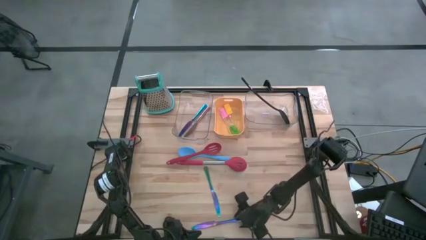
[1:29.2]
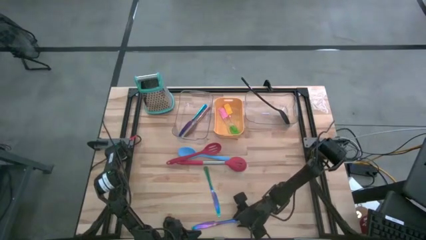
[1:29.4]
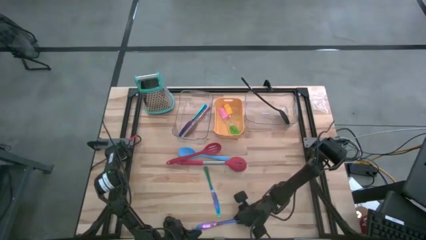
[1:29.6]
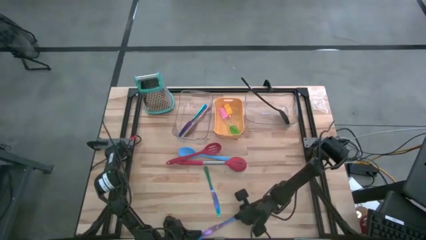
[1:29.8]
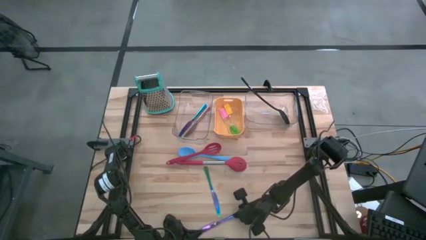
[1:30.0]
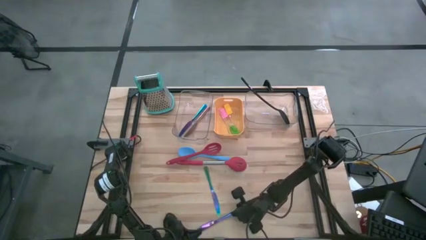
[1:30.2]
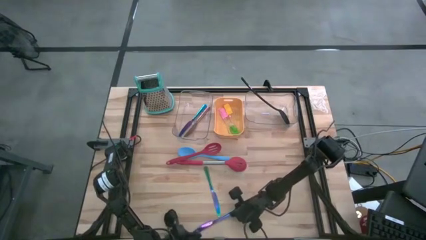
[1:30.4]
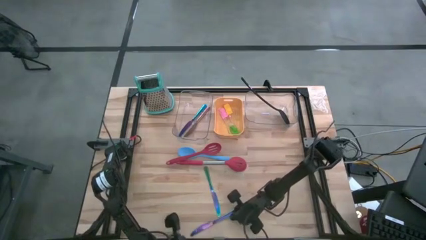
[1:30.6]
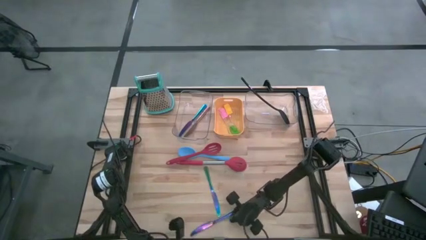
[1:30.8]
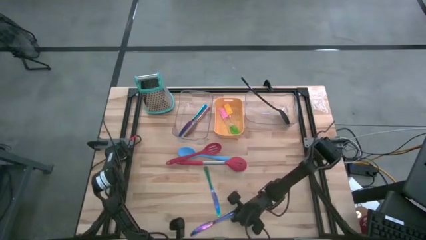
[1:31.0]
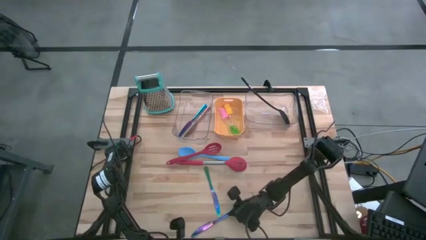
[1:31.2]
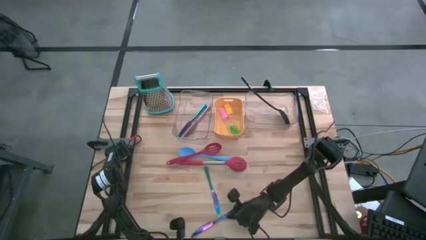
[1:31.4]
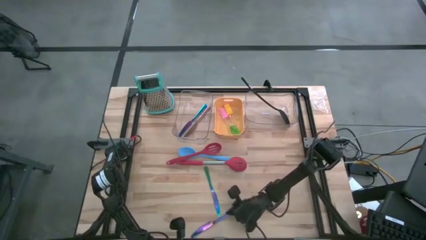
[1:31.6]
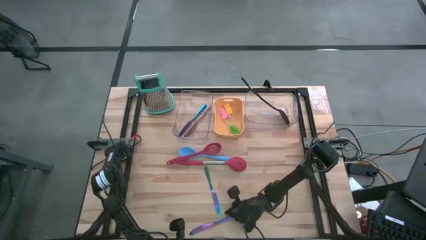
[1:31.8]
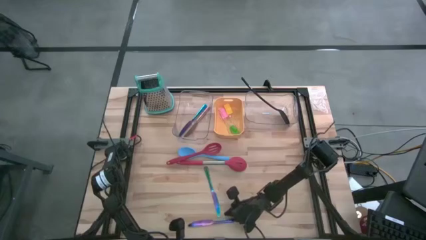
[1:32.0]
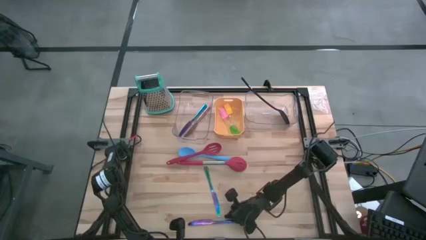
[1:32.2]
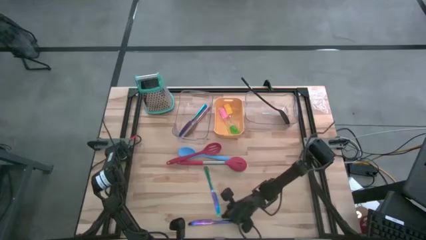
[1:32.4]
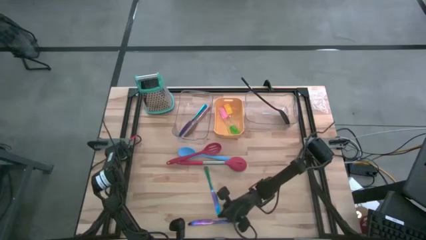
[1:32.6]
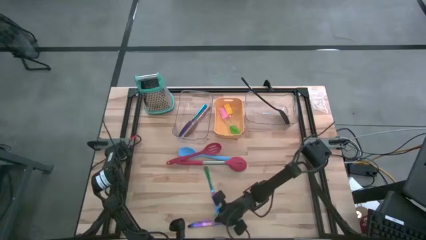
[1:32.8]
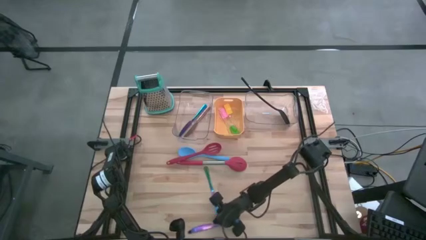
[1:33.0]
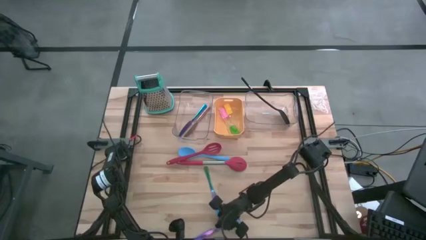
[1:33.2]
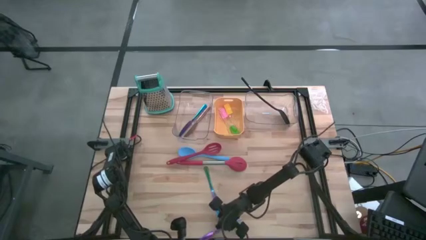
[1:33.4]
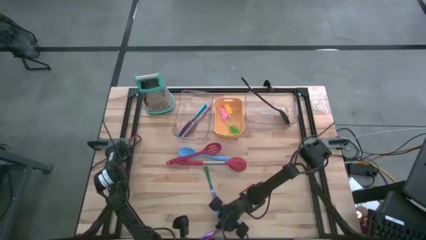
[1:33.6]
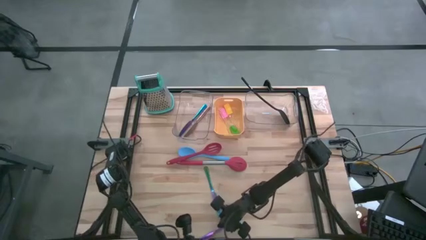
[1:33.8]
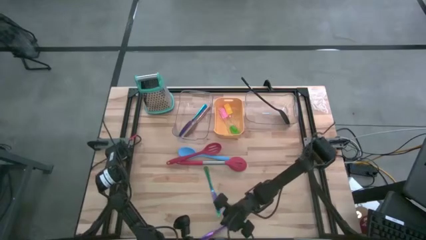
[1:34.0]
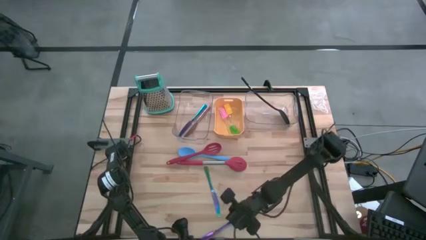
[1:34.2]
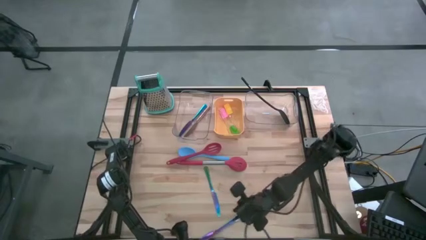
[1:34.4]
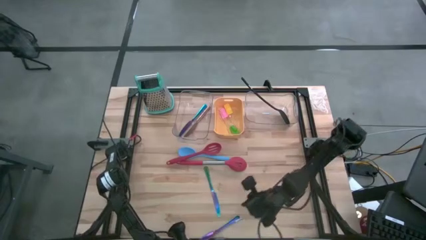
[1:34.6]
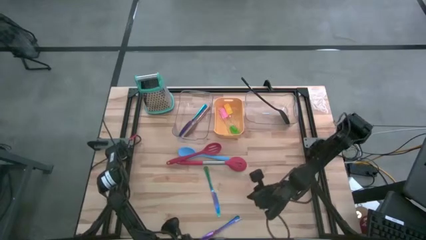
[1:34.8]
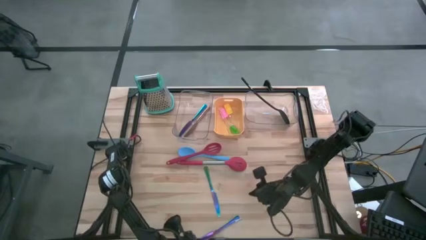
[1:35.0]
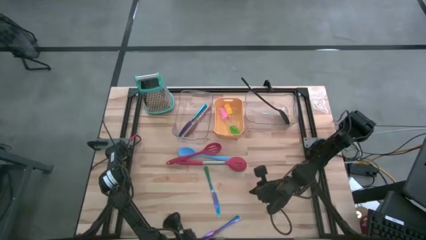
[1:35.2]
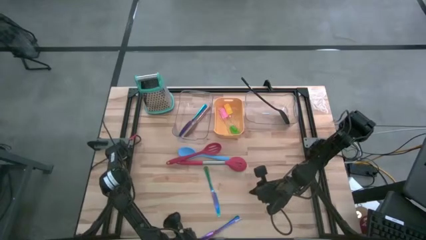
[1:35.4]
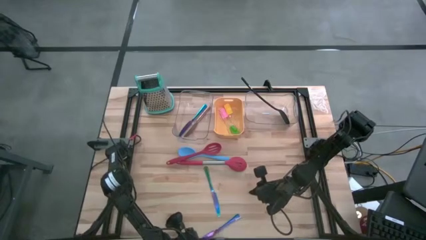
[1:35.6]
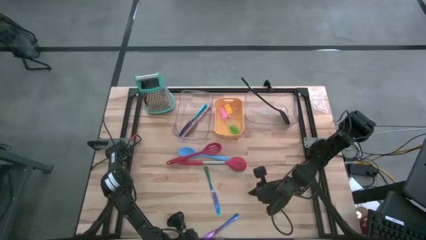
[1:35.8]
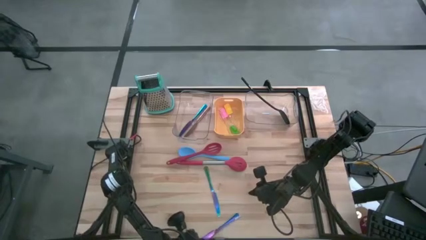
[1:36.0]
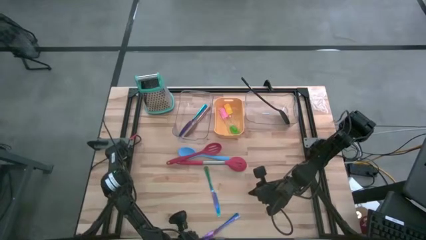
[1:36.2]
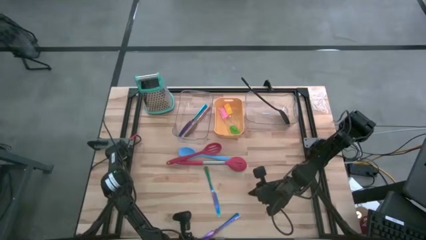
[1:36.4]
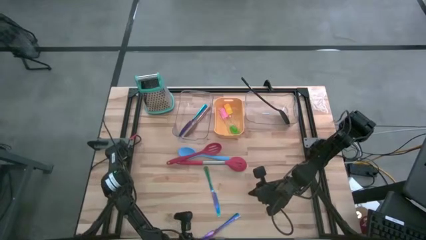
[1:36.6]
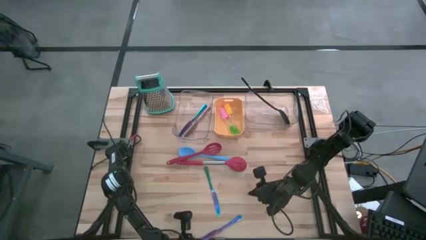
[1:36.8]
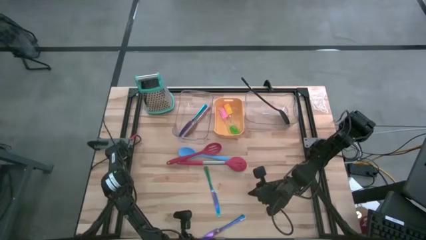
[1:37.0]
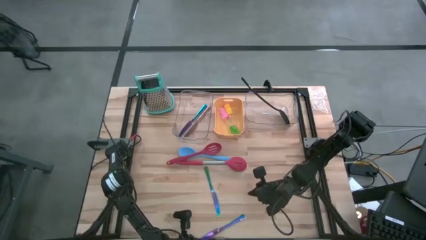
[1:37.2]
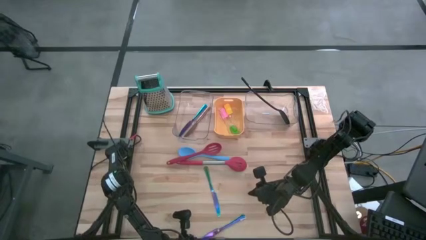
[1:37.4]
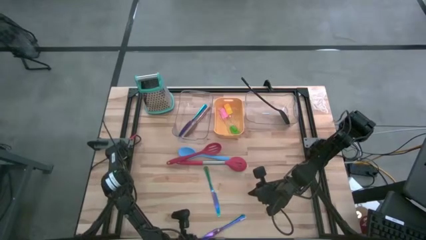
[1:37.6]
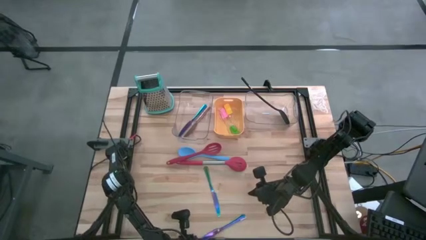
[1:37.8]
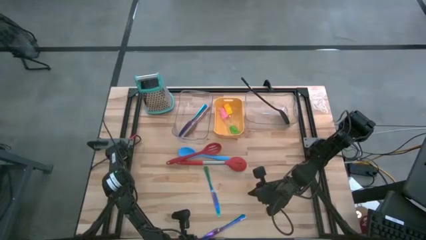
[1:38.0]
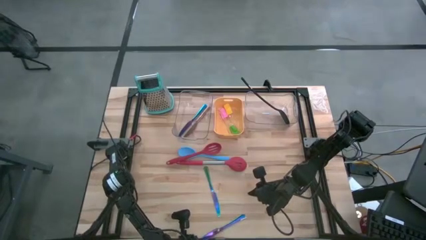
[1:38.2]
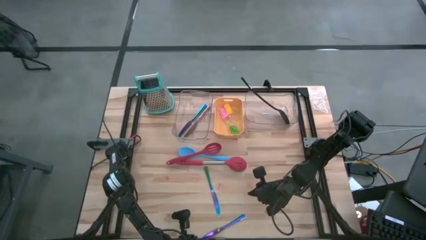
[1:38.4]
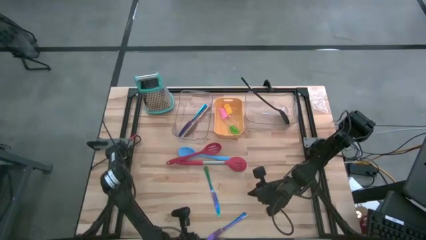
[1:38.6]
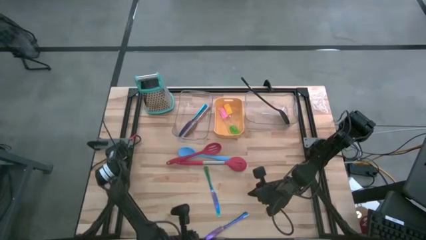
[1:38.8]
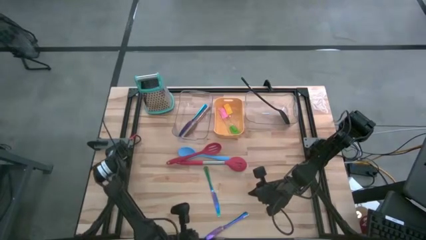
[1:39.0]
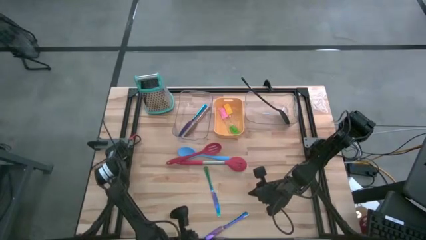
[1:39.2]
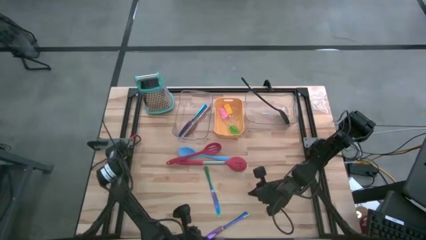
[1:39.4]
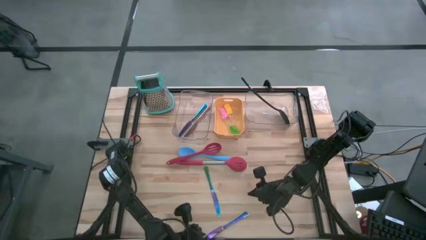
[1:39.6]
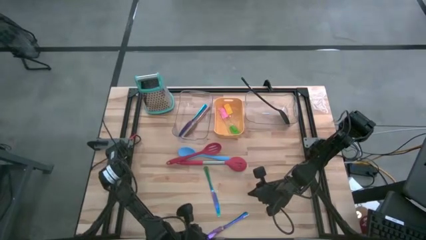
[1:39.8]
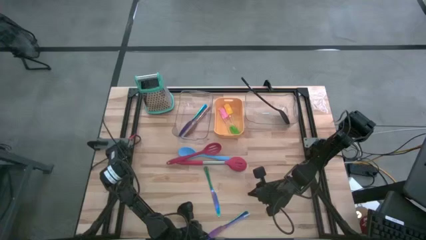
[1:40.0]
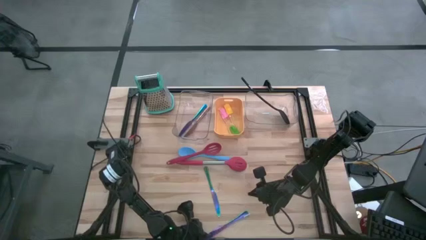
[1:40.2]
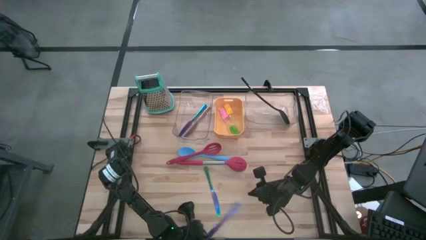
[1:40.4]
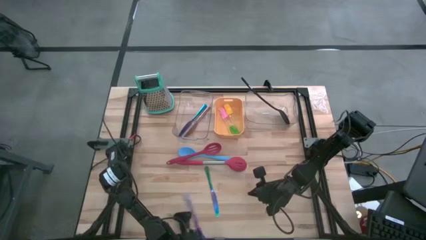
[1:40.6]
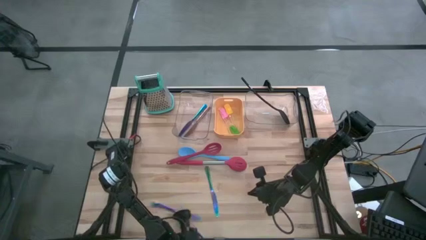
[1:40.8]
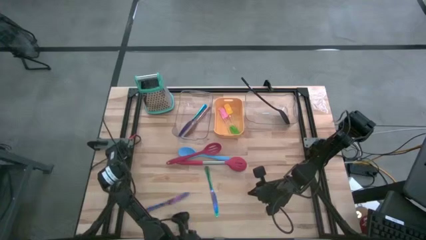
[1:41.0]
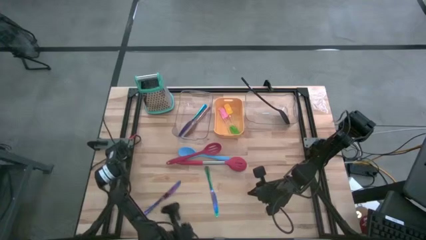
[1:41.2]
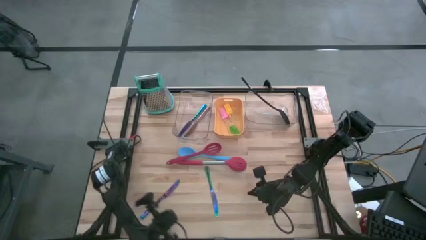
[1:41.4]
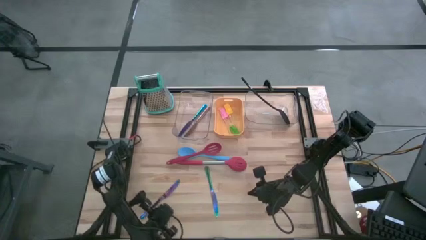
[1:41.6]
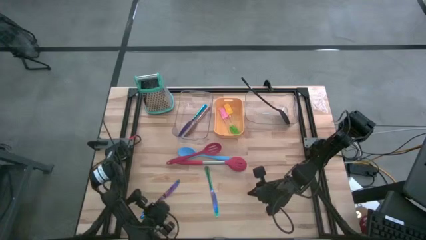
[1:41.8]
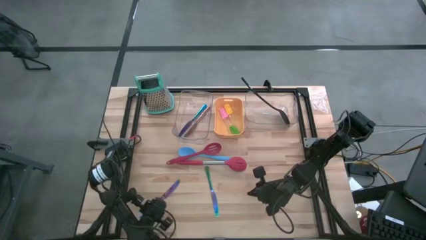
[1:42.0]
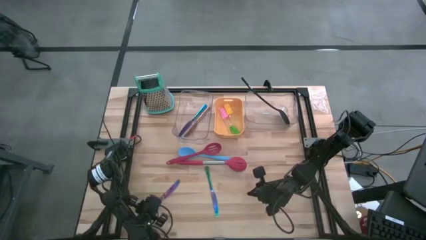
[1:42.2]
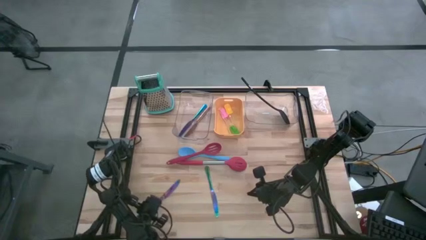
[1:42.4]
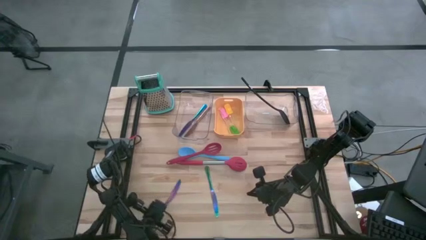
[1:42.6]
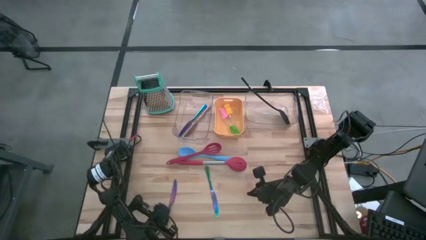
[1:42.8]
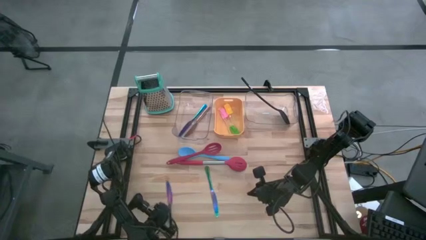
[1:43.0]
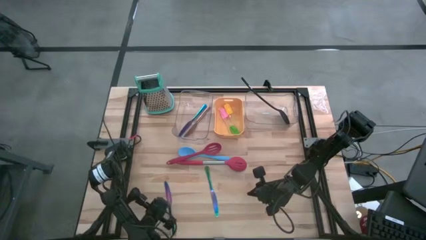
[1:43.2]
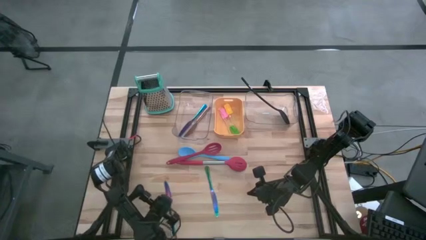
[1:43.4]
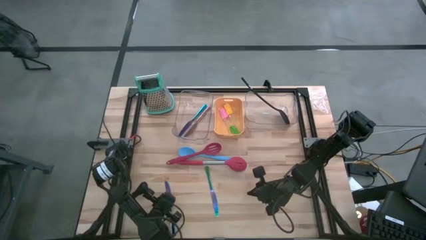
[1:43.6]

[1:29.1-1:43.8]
Task: Pick & Place Kitchen Items
Put the left blue knife into the left transparent bin
